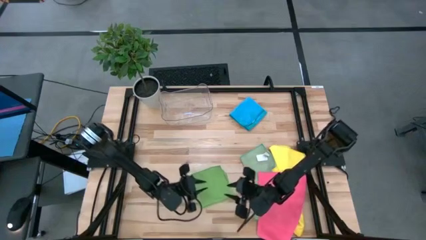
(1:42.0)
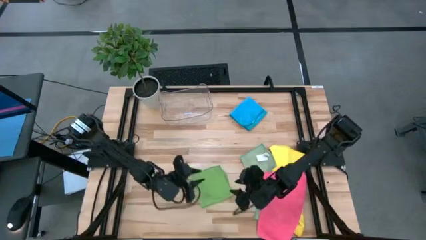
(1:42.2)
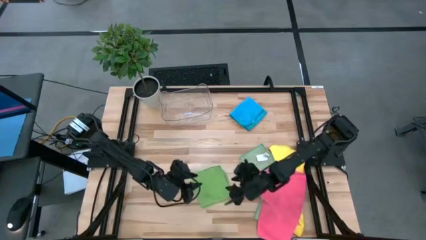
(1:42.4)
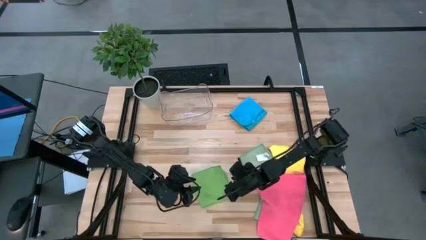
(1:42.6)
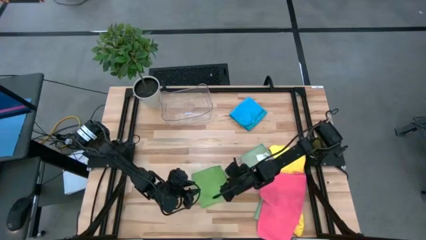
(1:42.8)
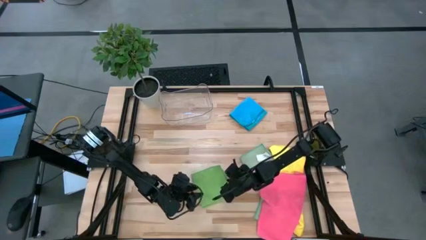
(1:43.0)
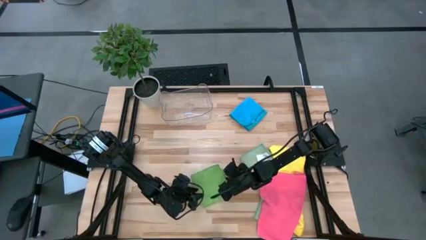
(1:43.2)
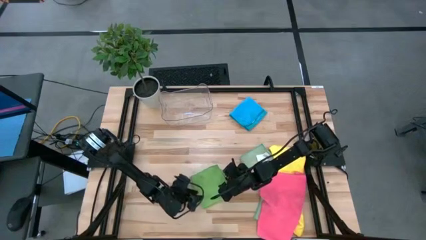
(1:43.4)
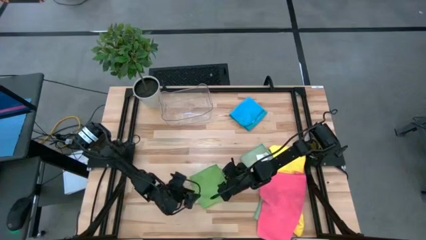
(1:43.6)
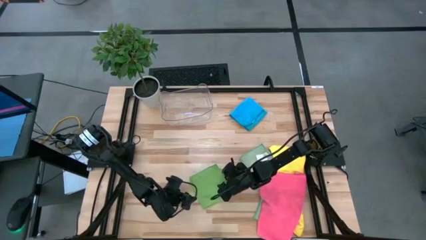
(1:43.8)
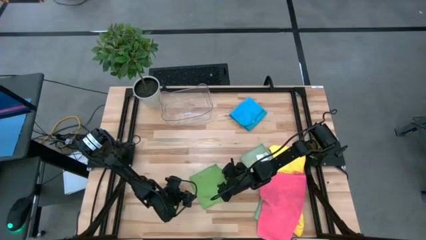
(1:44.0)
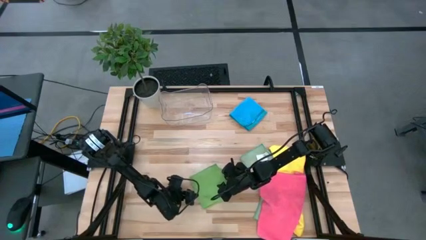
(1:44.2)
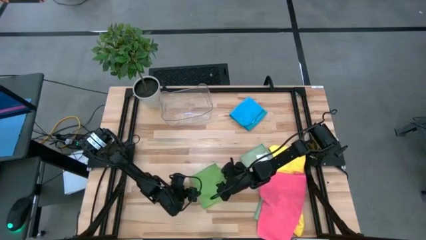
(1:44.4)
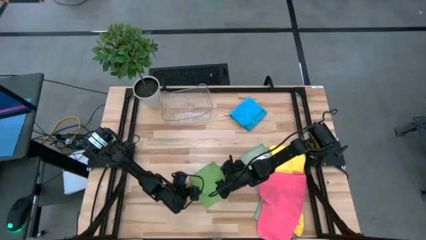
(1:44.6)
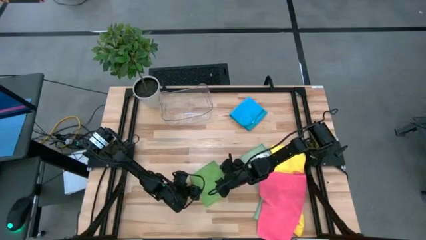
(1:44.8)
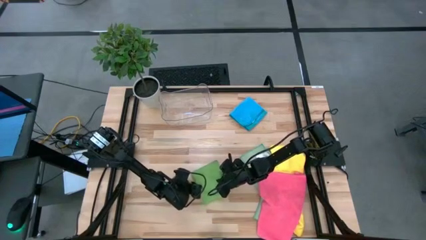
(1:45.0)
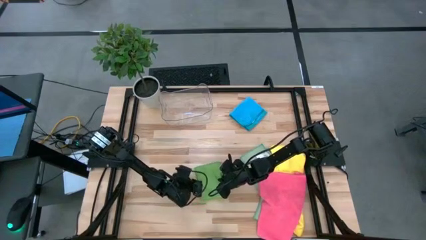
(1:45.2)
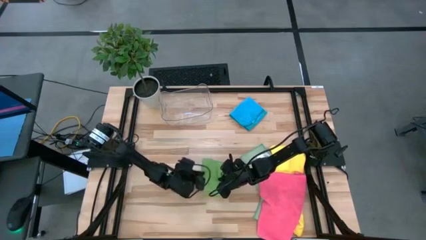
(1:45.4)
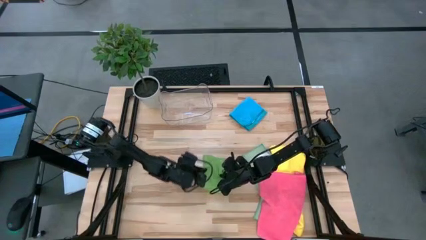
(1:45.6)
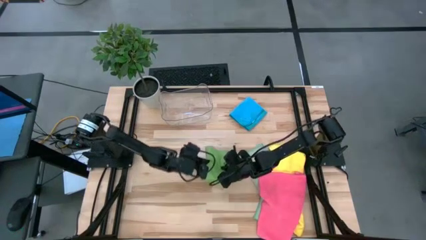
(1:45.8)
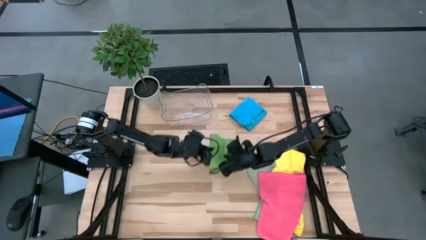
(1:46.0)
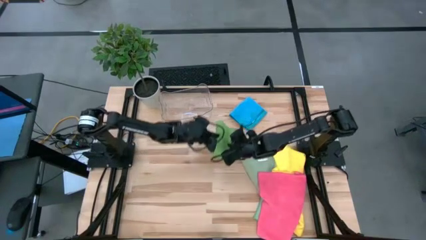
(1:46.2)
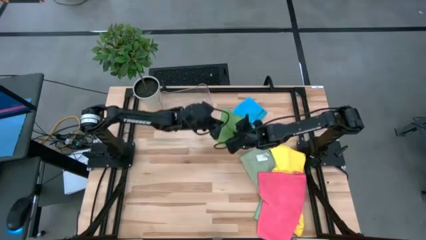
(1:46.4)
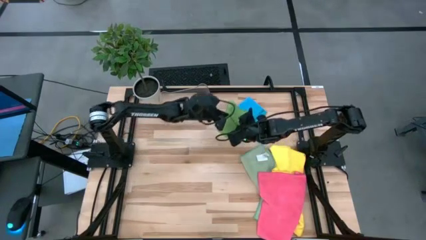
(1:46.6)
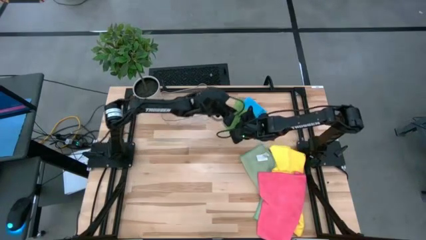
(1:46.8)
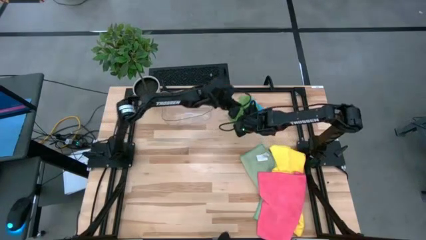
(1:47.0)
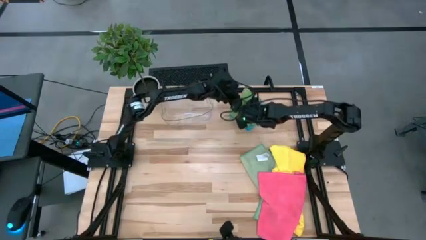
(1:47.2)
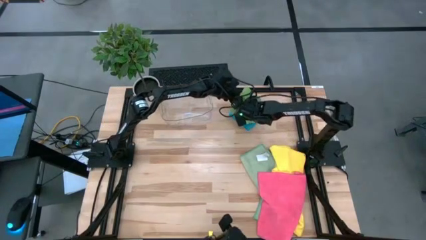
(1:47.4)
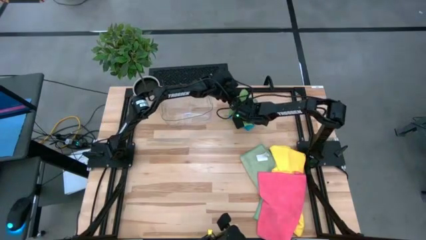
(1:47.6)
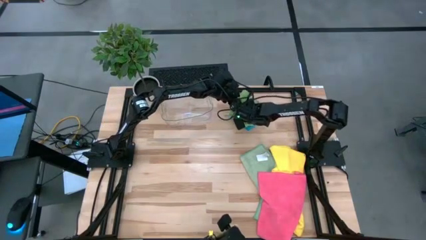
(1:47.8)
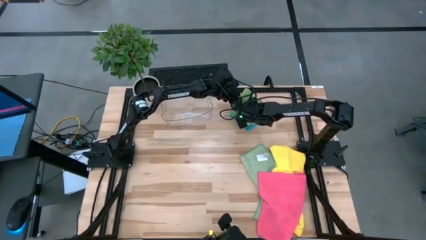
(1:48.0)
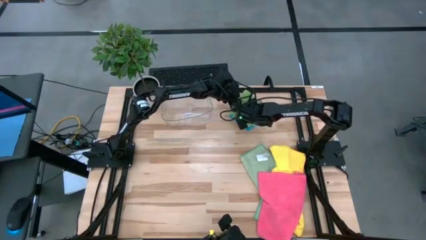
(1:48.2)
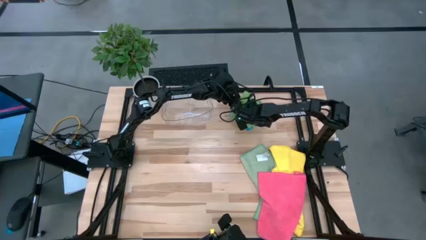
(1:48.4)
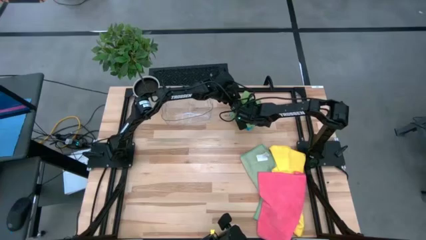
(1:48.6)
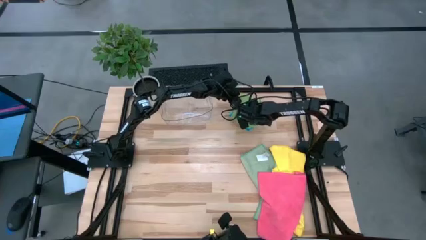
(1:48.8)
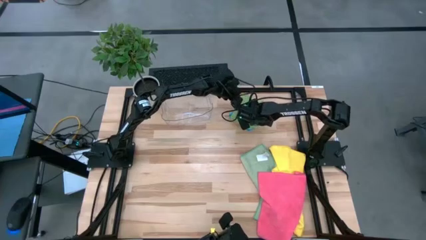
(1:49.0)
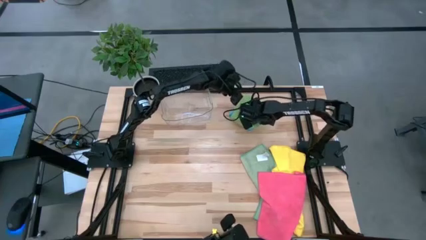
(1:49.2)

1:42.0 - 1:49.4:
Task: Fold microfiber towels
Stack the green microfiber cloth on the blue microfiber cloth

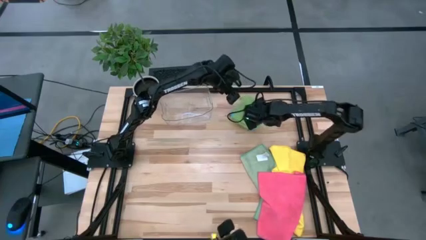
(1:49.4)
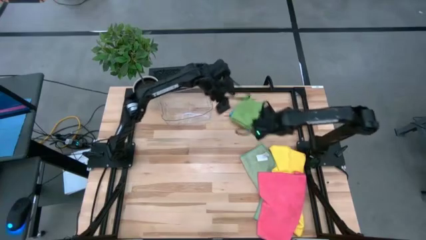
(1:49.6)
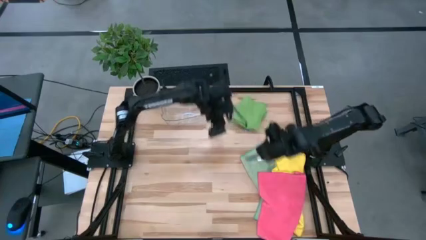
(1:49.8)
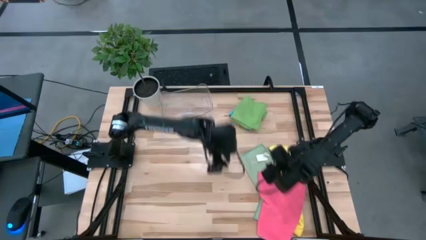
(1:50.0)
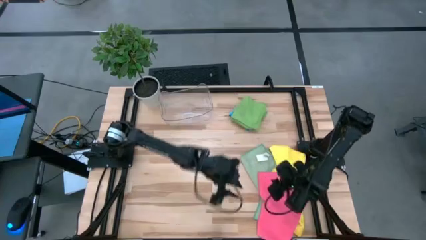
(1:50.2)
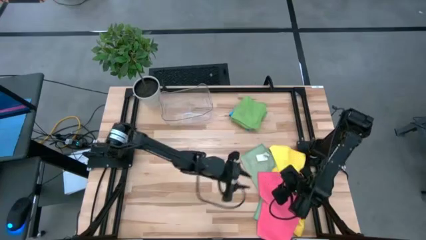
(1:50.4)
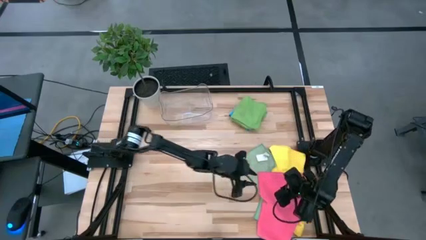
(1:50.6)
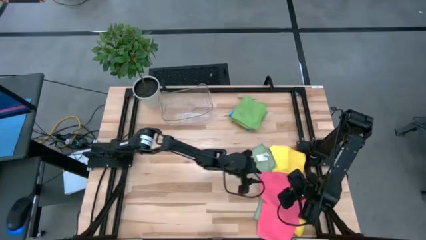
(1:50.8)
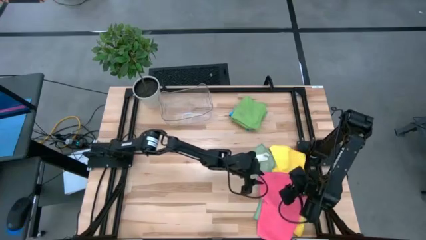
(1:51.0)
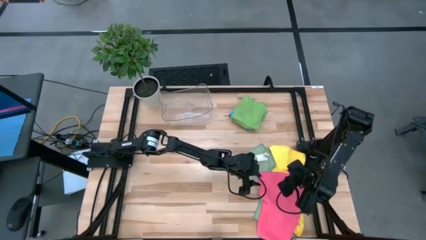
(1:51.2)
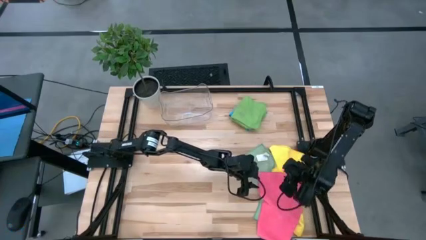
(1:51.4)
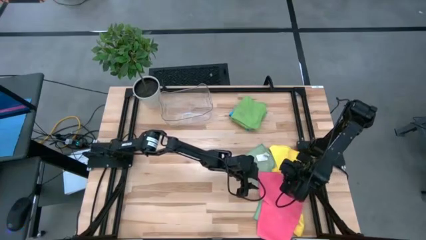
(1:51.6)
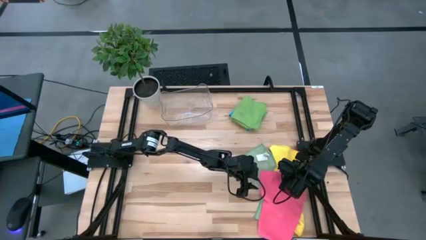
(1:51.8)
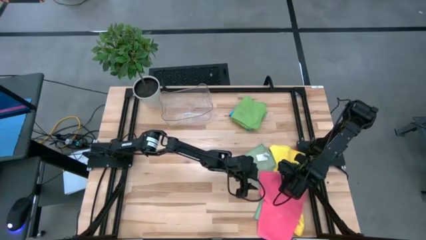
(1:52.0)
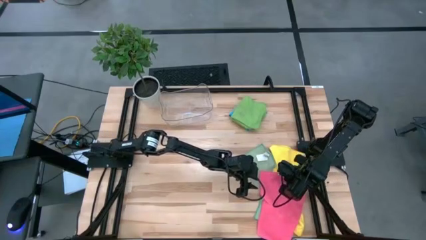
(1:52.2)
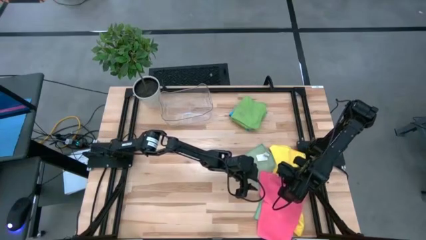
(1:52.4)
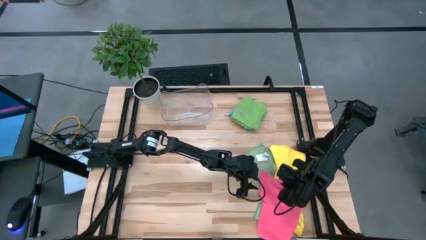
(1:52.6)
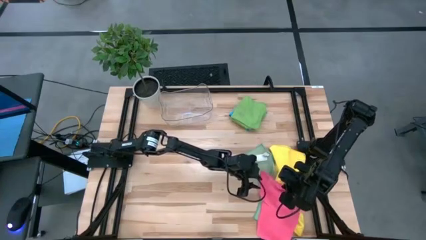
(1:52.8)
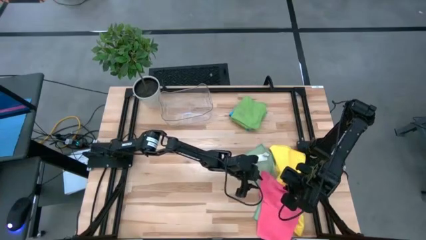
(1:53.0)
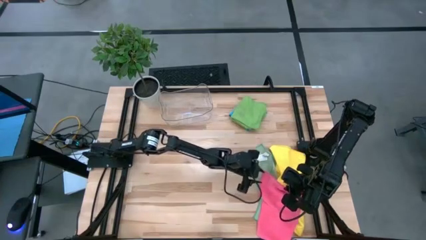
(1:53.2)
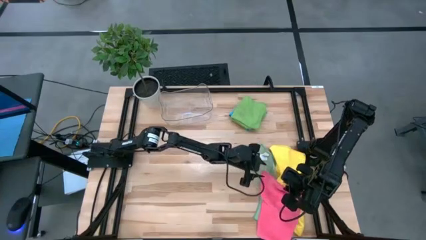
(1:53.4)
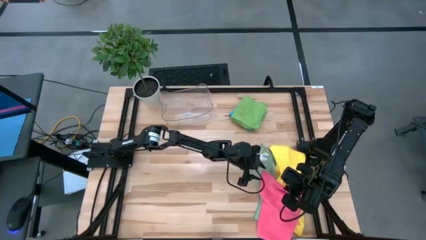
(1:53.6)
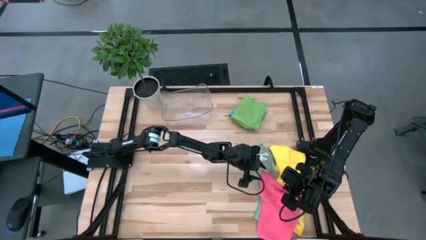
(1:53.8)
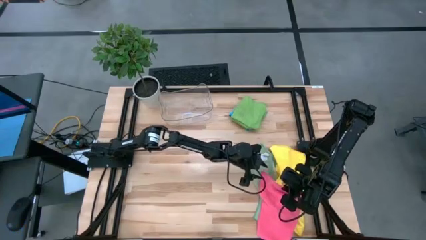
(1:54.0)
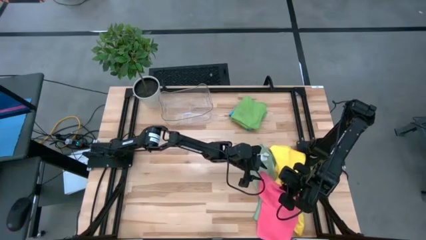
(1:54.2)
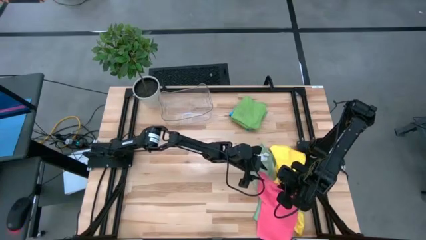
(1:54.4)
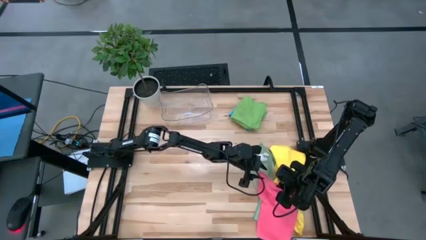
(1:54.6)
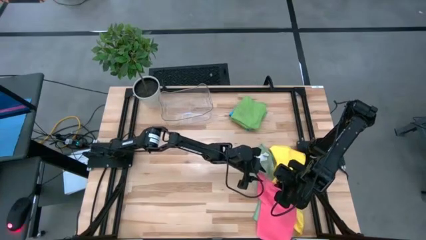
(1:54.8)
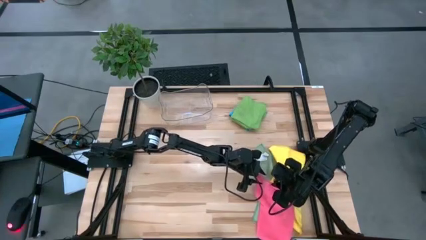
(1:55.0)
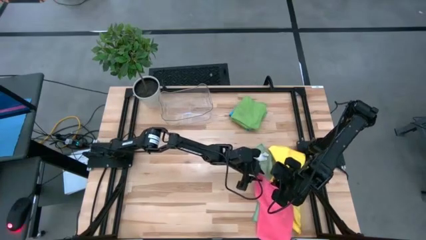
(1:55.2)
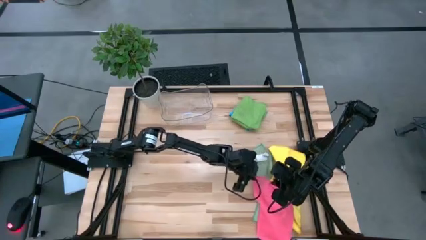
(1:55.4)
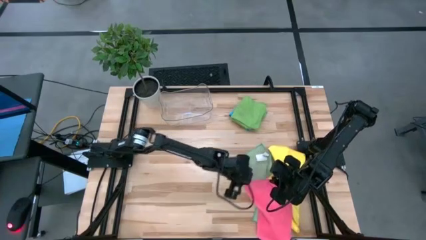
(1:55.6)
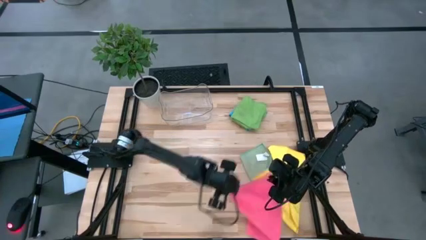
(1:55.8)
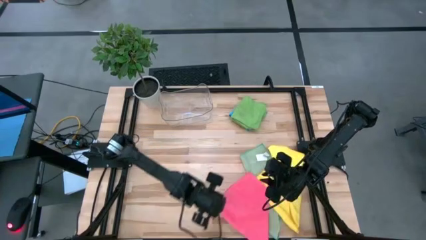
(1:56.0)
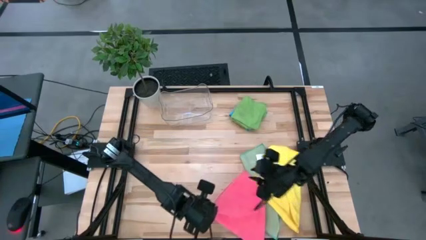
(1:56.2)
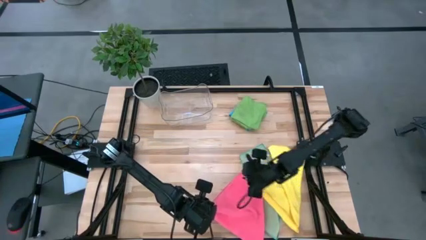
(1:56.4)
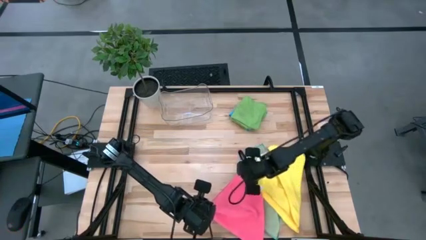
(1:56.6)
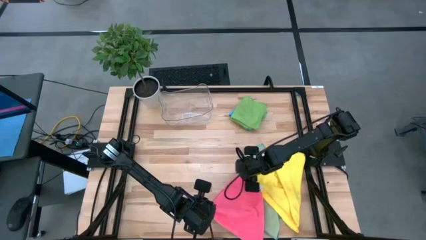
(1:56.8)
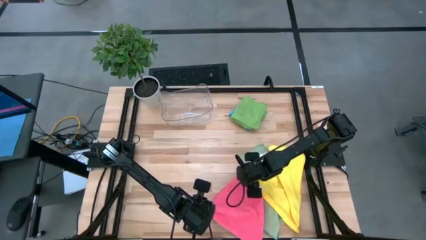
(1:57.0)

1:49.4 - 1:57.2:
Fold the pink microfiber cloth
